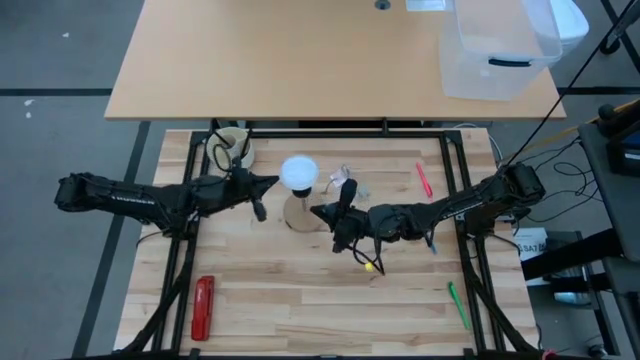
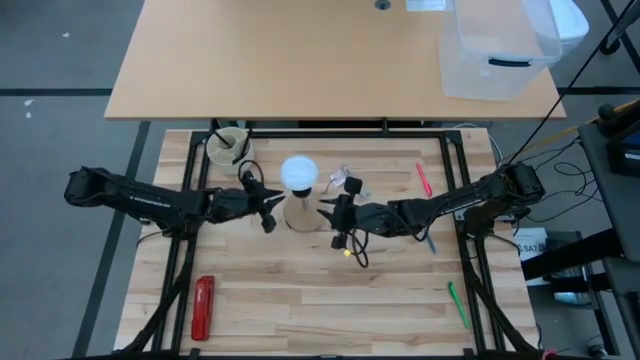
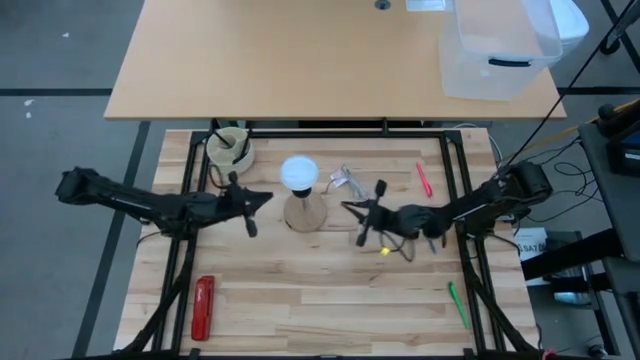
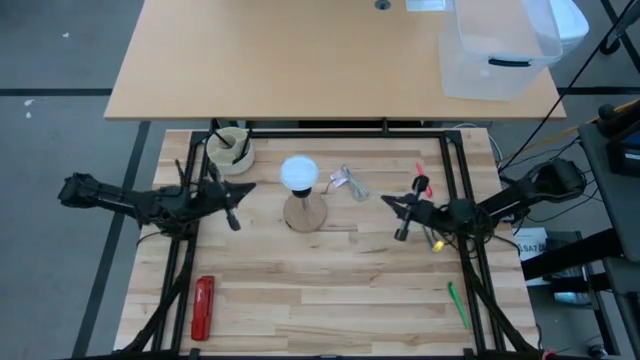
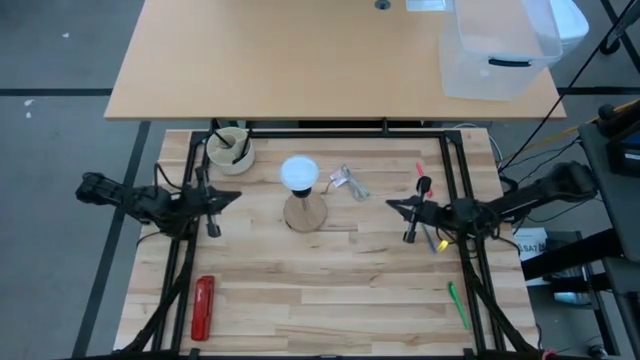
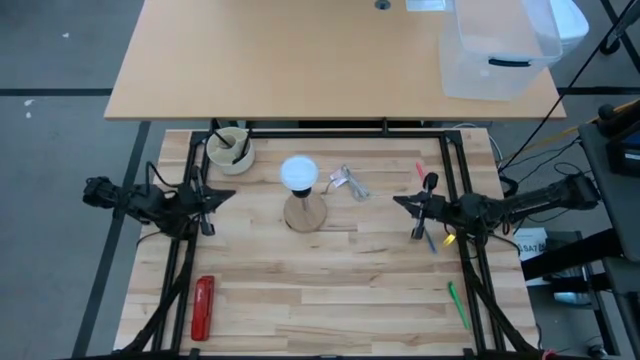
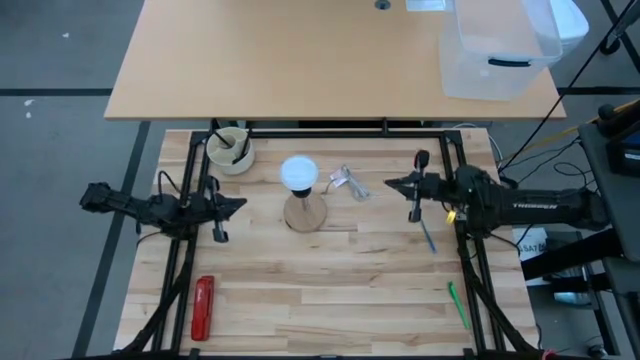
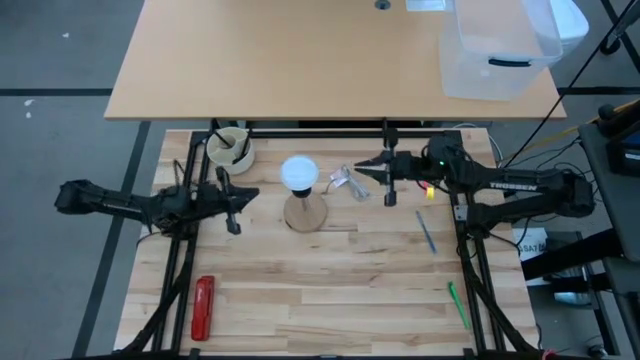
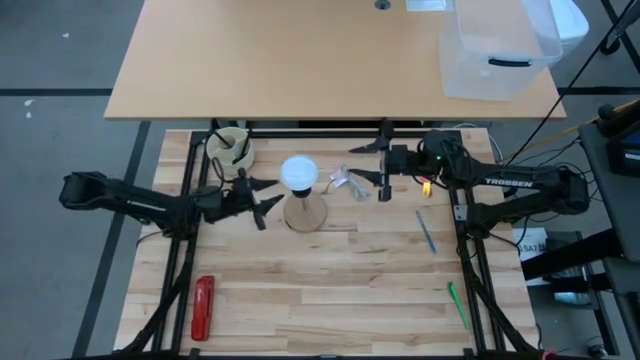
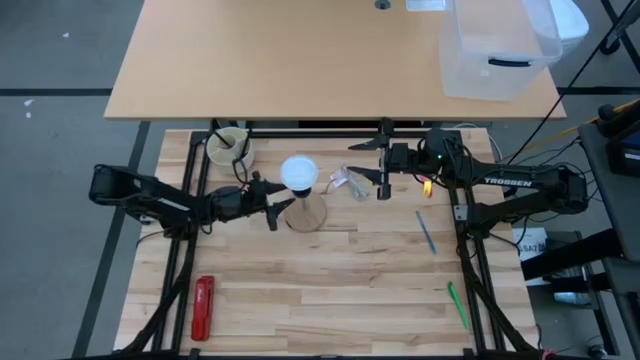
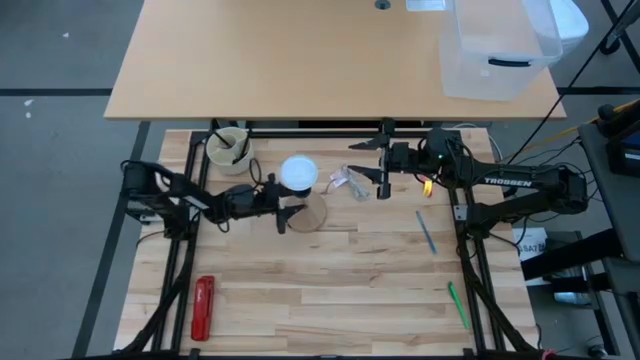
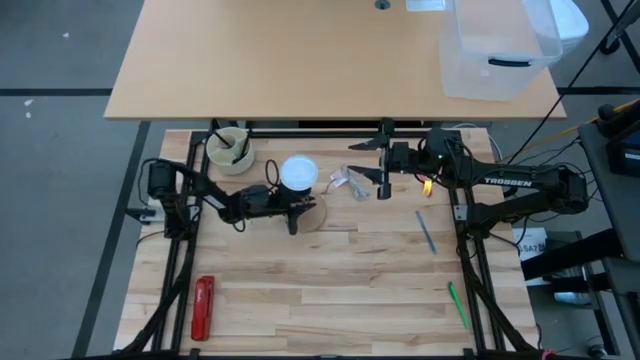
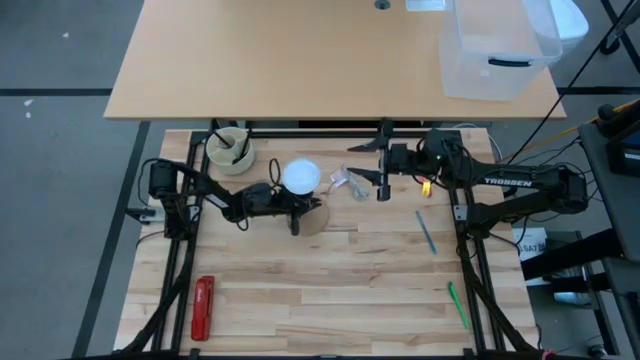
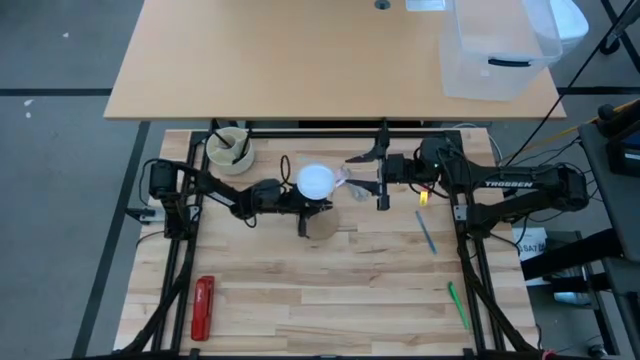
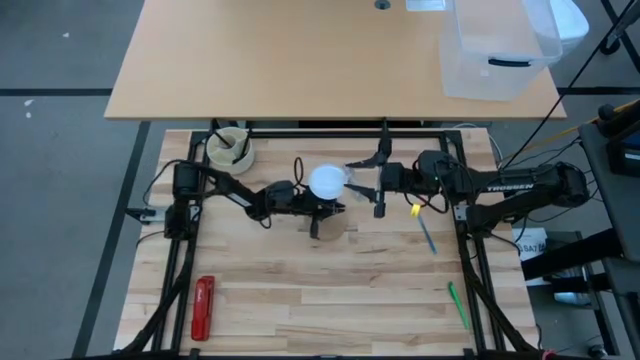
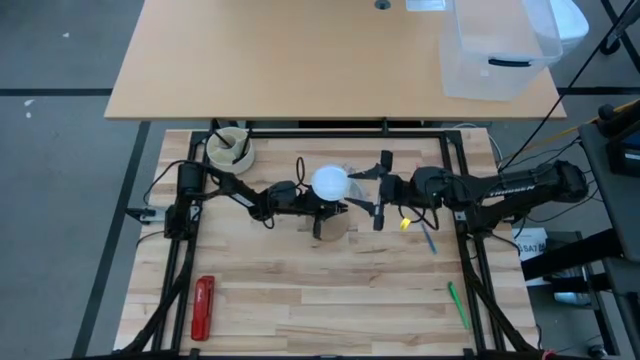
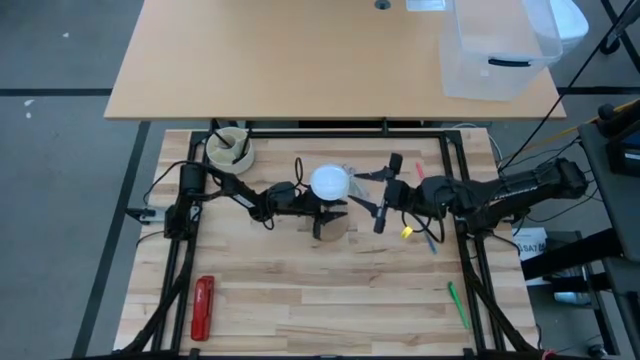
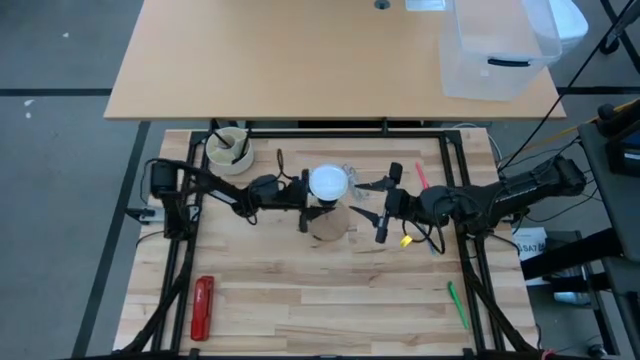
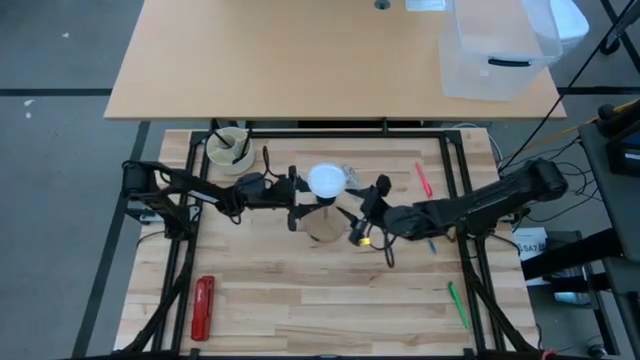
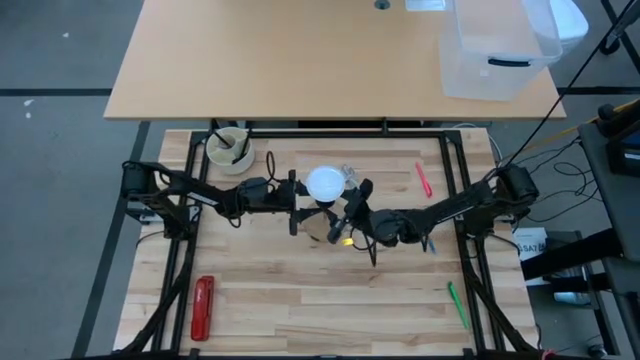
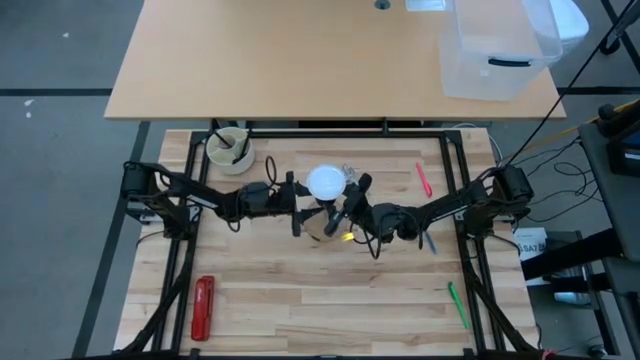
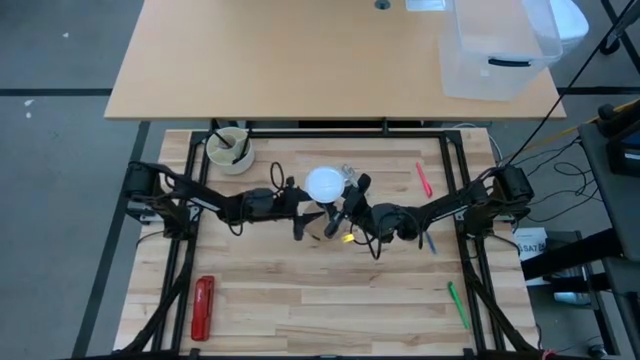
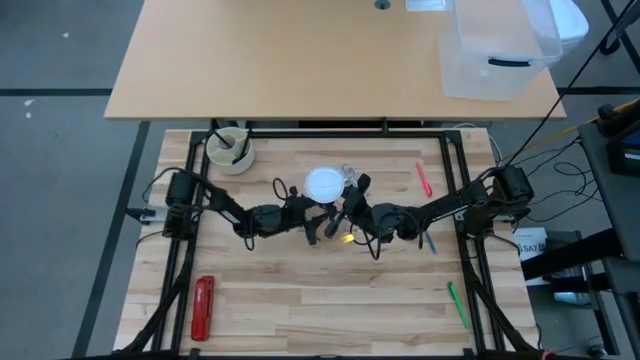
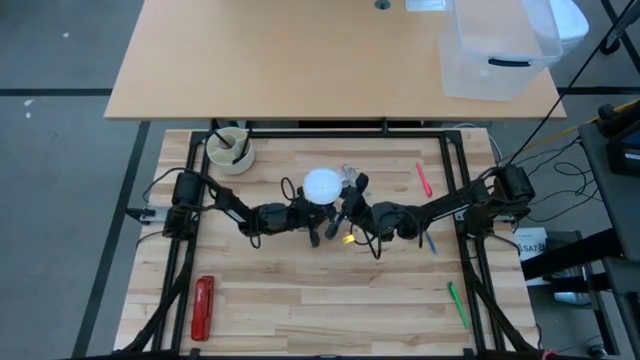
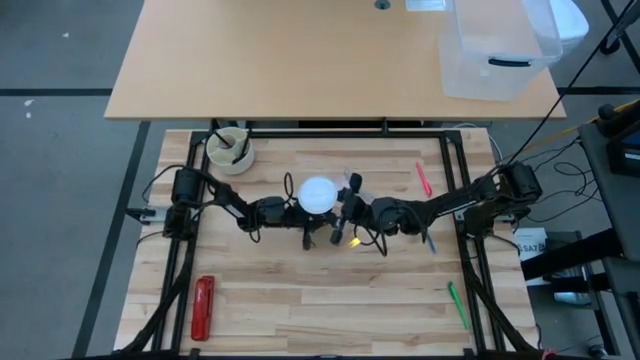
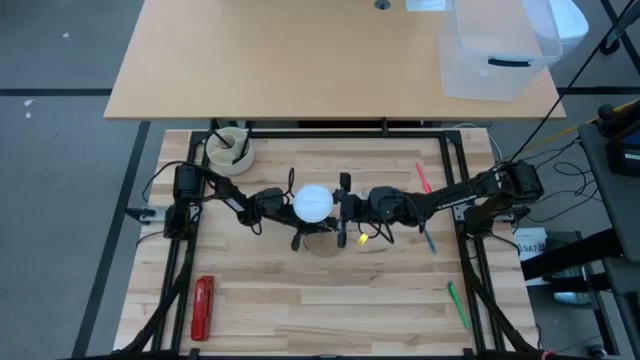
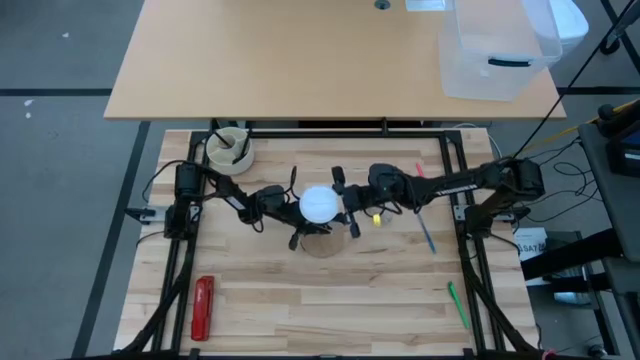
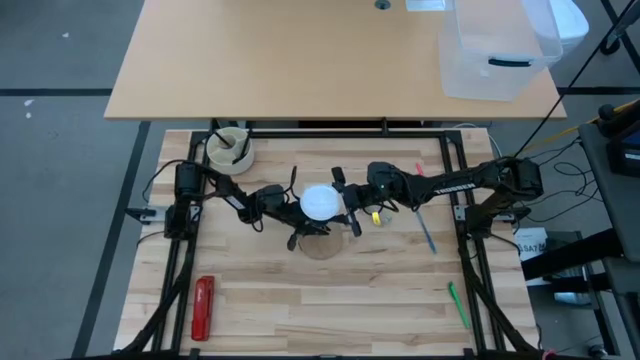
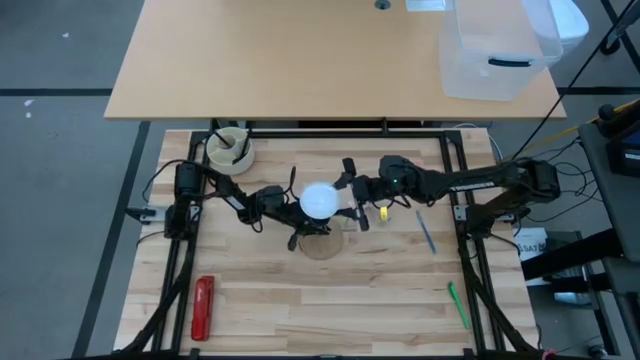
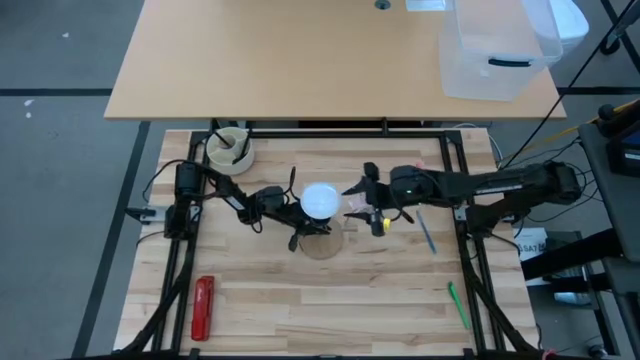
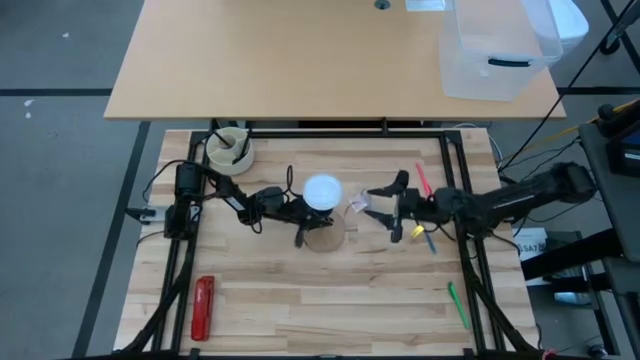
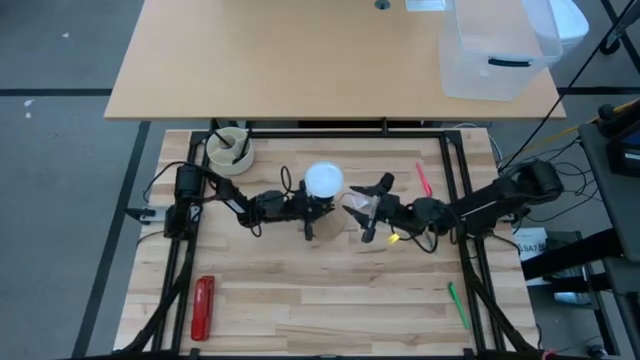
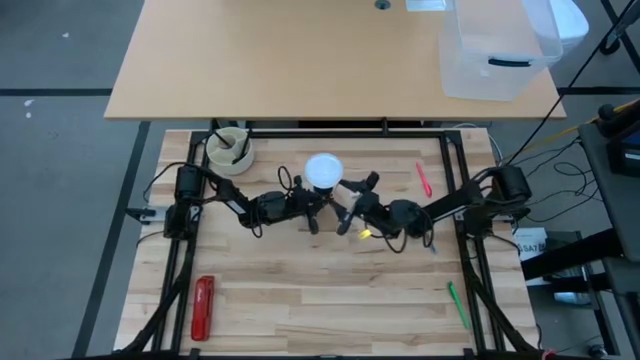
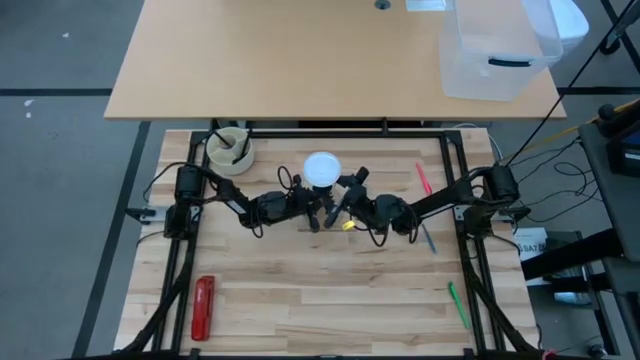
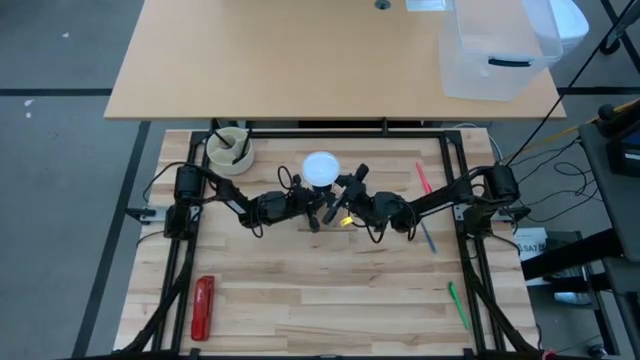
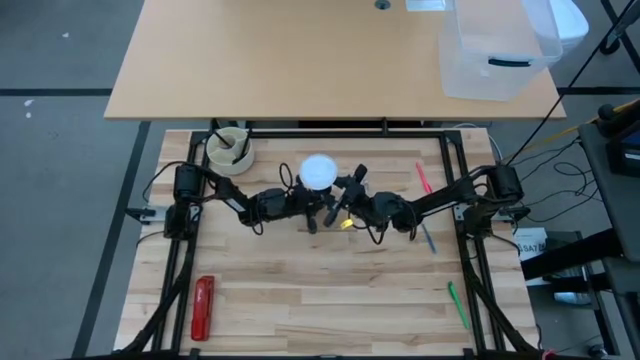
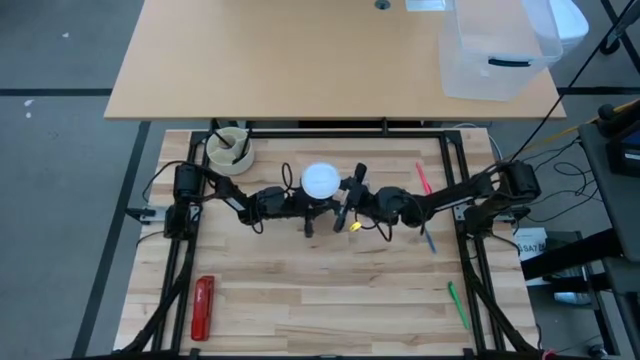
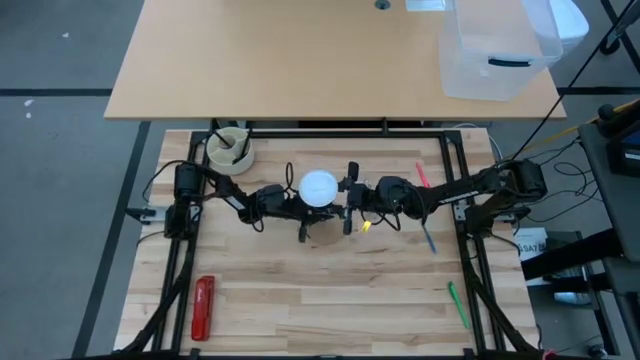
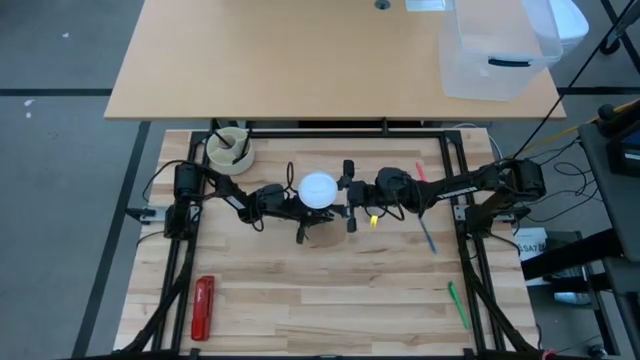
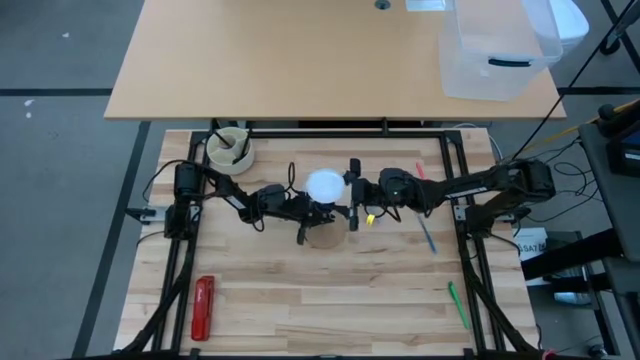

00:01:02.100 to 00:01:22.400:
Task: Screw lightbulb
Remove the lightbulb from the desk lamp
